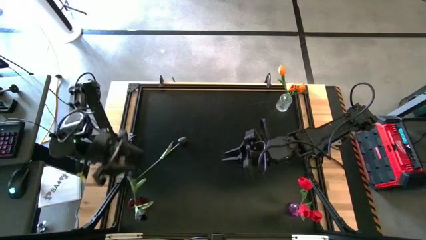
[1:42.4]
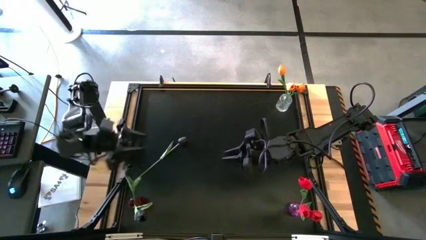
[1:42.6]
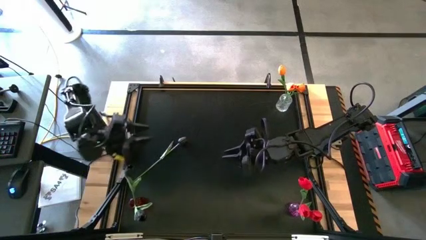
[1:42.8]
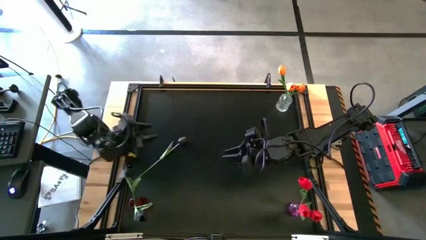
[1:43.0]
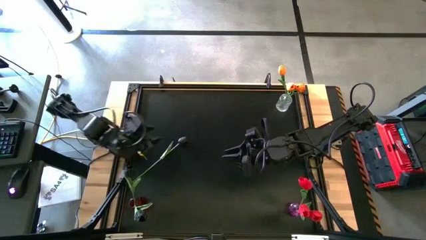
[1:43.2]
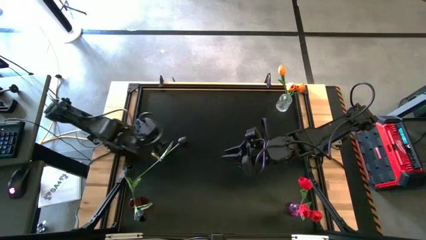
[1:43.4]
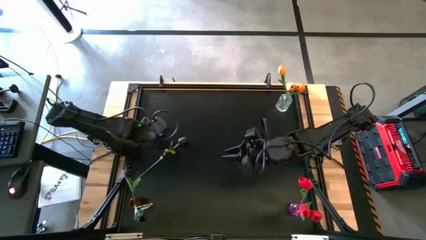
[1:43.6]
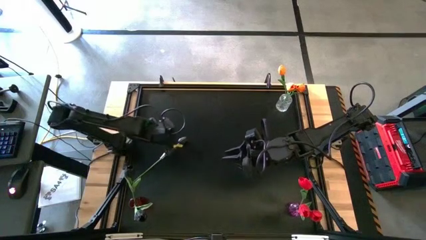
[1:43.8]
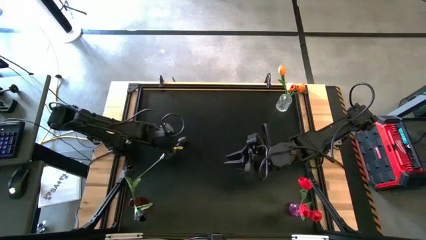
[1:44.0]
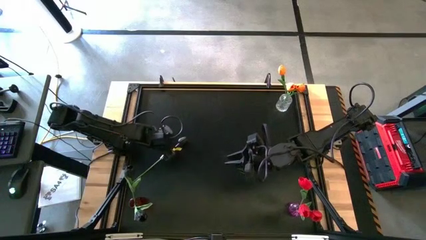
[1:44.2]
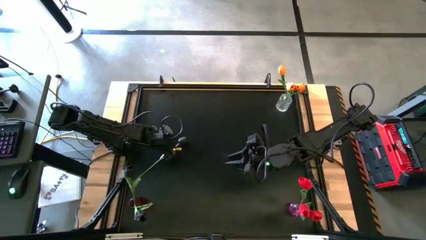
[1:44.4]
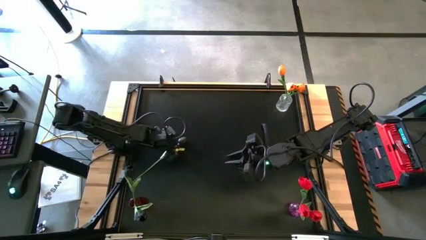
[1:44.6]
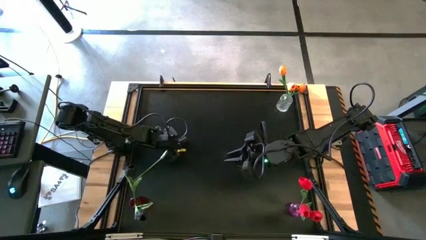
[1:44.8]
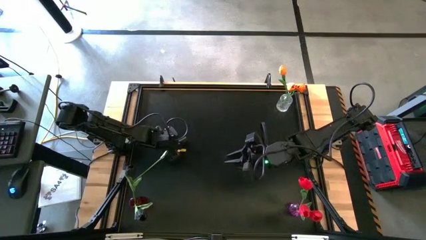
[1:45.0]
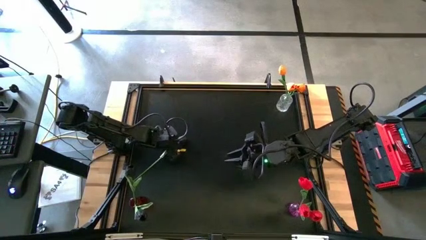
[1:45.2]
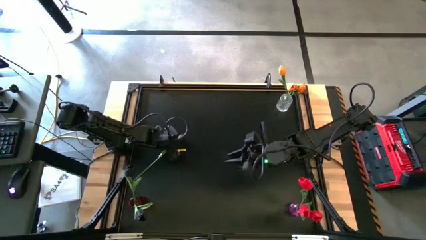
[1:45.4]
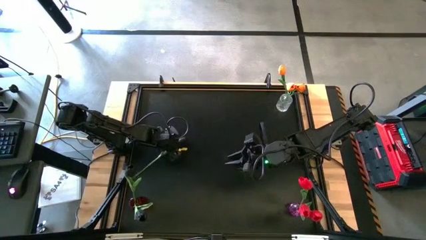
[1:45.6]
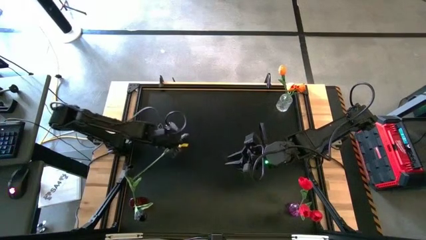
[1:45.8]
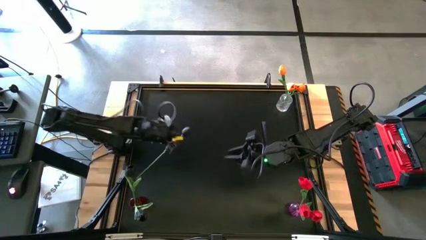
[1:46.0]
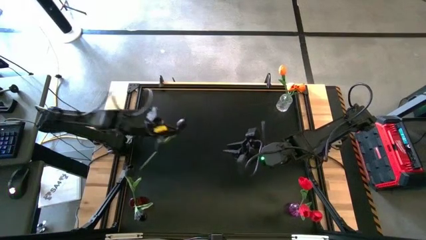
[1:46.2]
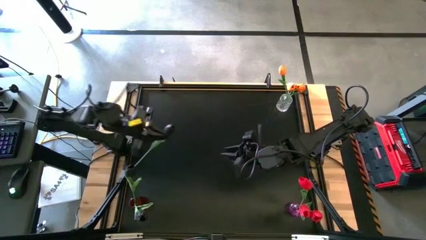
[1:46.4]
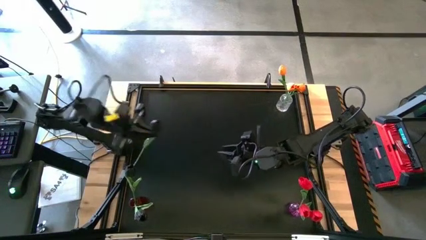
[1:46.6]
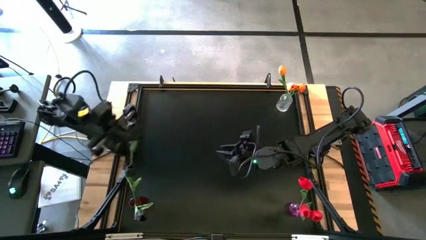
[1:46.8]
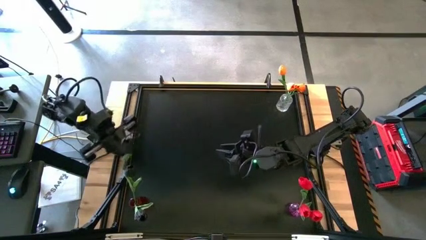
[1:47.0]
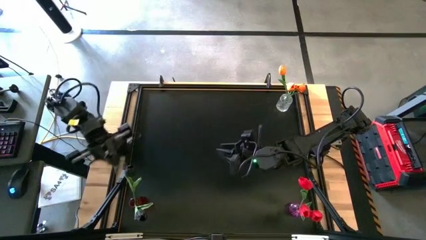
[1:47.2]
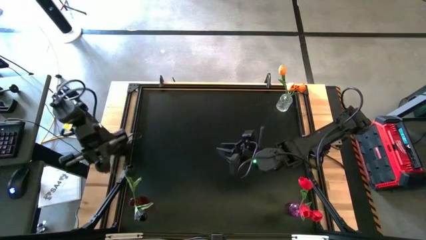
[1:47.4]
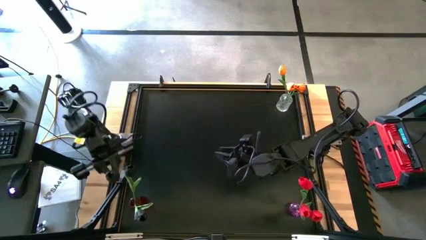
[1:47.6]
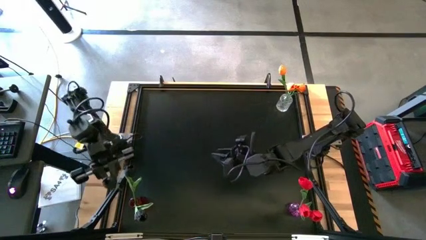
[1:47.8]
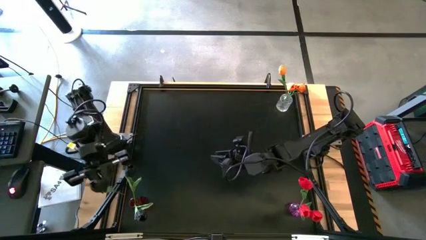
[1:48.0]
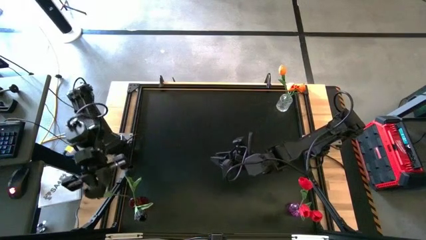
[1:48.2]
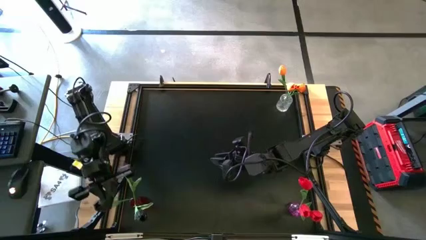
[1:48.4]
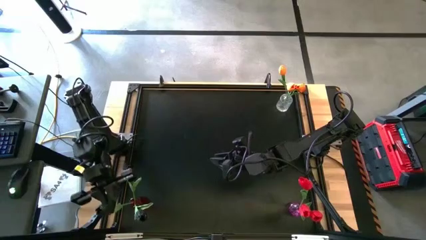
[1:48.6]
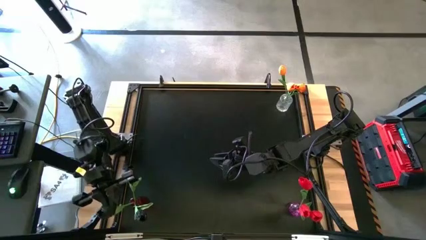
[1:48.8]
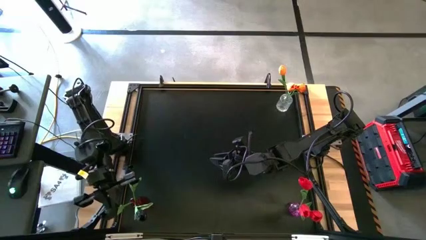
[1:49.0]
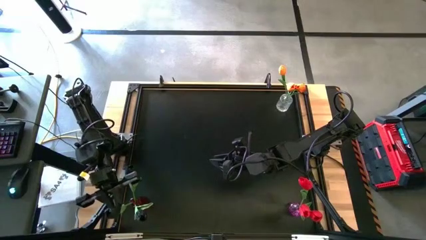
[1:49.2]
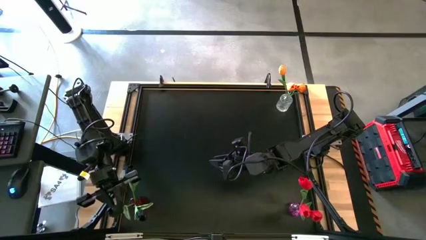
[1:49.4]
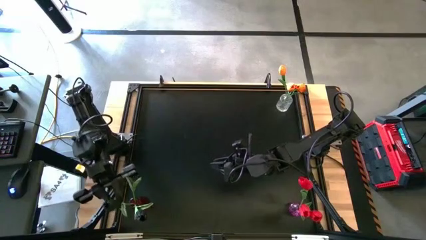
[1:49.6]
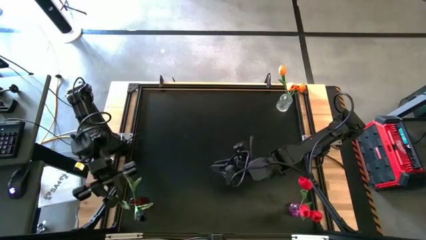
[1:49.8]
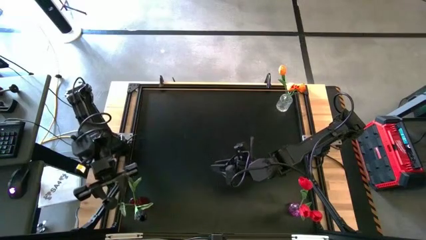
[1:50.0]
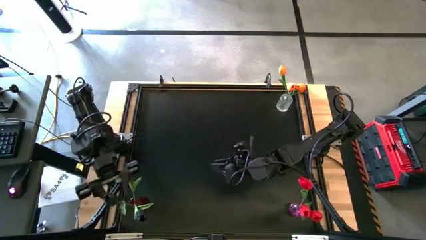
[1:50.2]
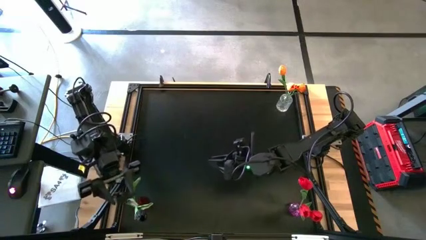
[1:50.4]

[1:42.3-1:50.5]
Task: Sort flowers into vase by color
Put the black tulip into the red flower vase

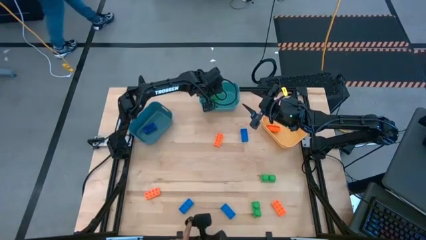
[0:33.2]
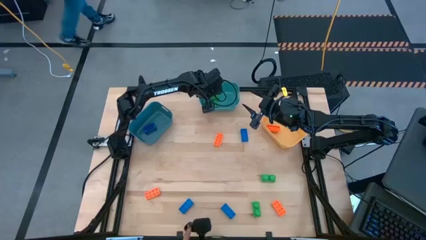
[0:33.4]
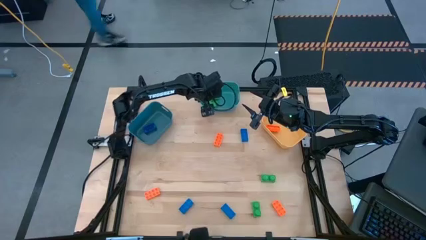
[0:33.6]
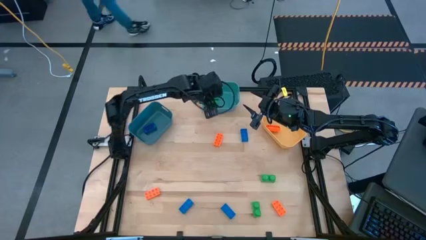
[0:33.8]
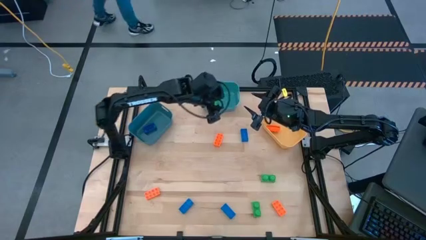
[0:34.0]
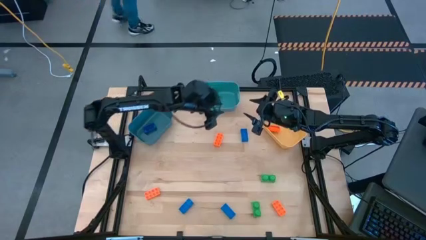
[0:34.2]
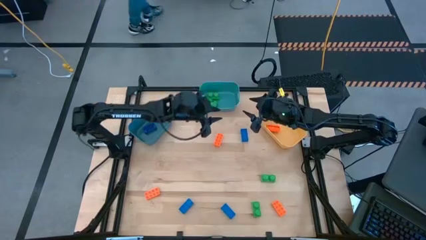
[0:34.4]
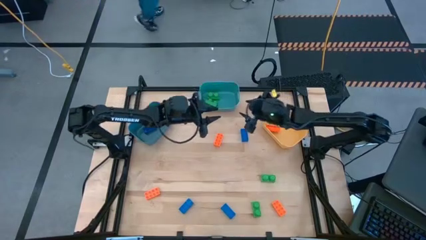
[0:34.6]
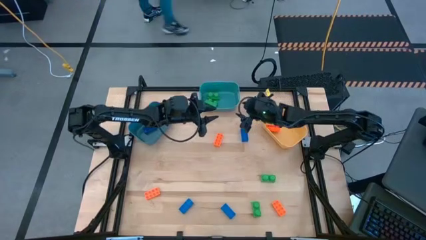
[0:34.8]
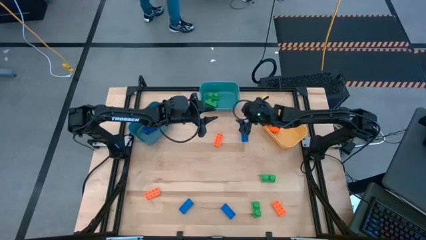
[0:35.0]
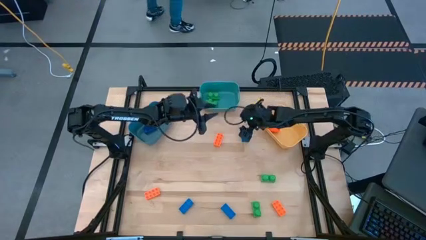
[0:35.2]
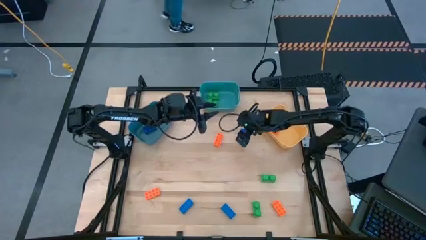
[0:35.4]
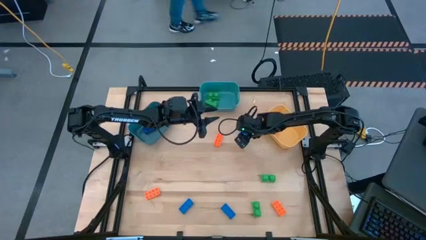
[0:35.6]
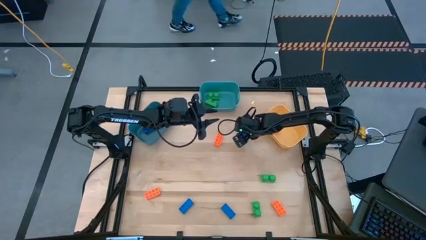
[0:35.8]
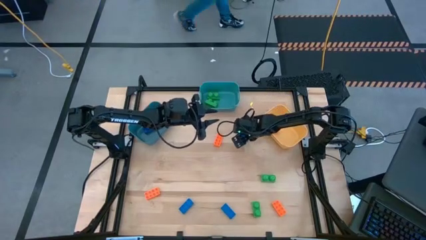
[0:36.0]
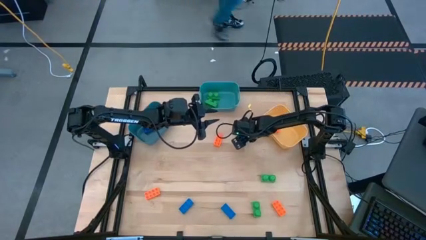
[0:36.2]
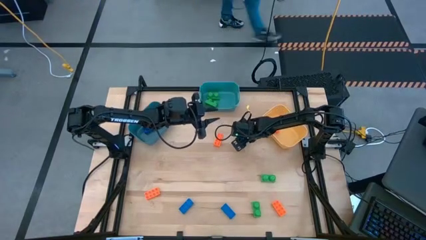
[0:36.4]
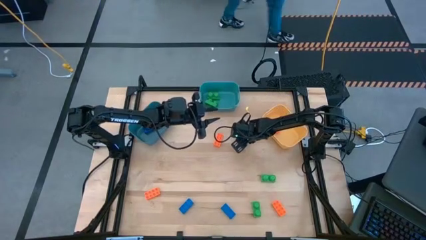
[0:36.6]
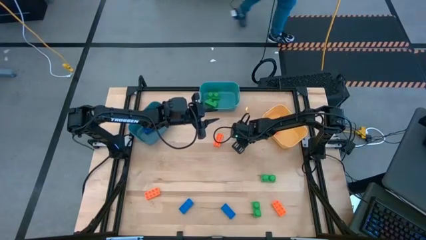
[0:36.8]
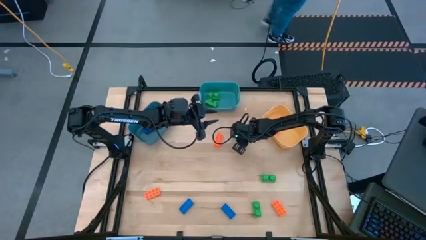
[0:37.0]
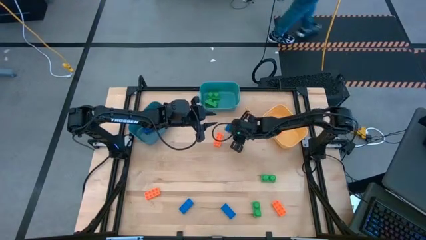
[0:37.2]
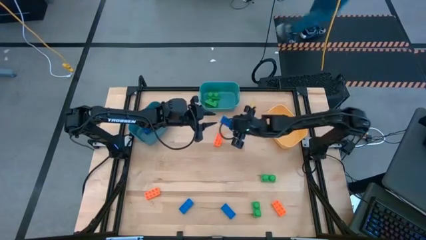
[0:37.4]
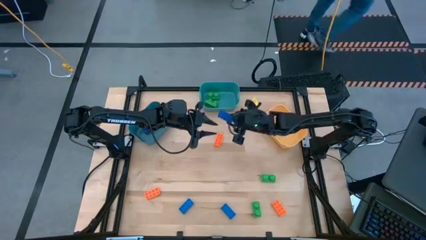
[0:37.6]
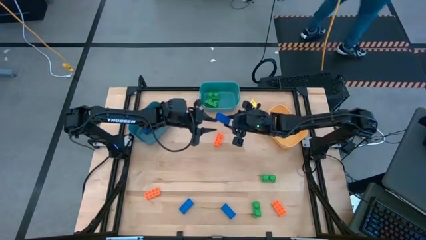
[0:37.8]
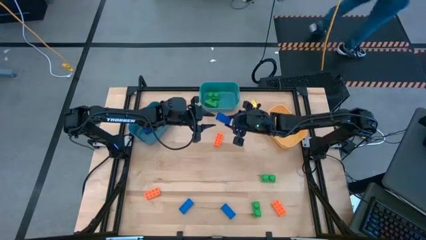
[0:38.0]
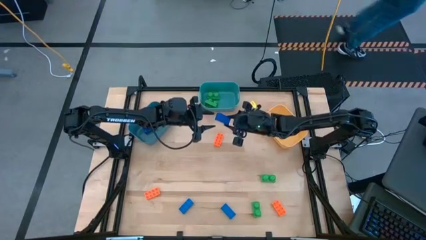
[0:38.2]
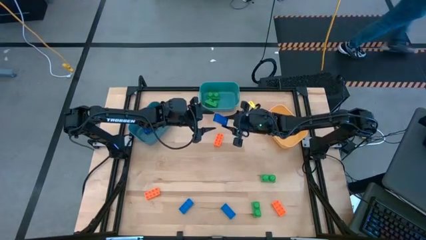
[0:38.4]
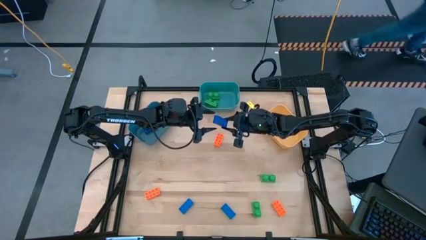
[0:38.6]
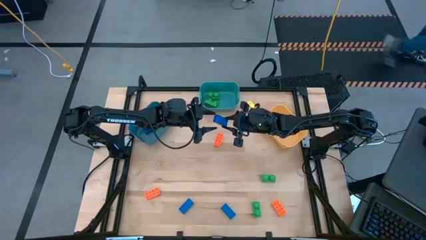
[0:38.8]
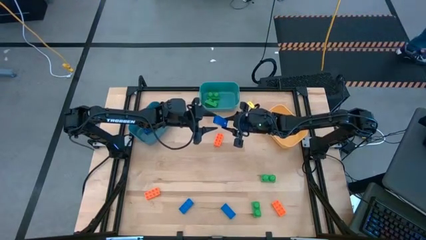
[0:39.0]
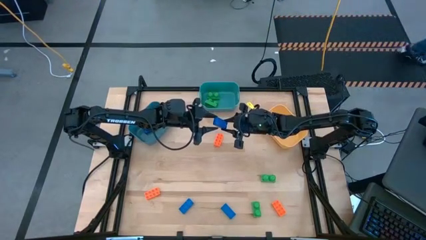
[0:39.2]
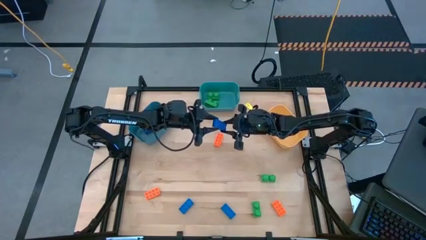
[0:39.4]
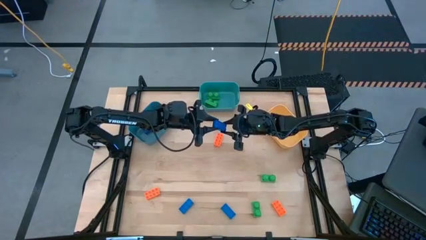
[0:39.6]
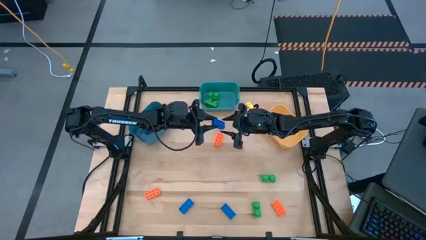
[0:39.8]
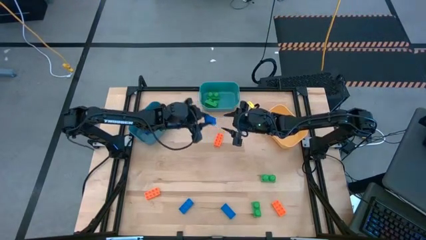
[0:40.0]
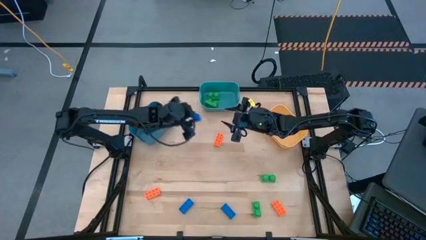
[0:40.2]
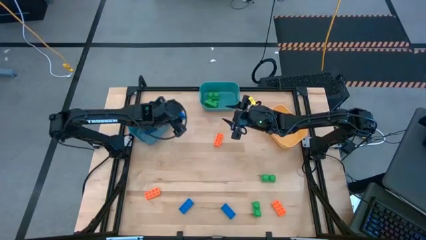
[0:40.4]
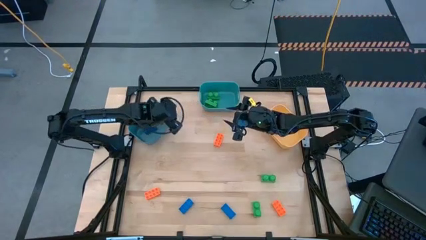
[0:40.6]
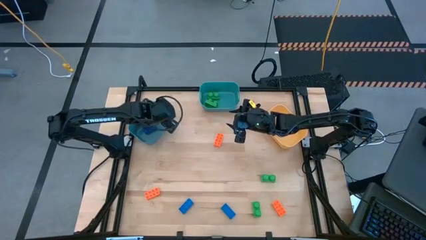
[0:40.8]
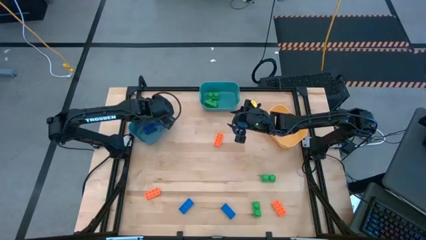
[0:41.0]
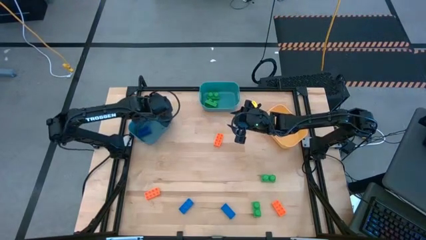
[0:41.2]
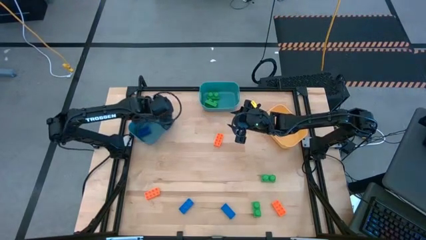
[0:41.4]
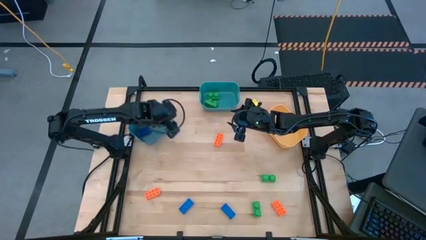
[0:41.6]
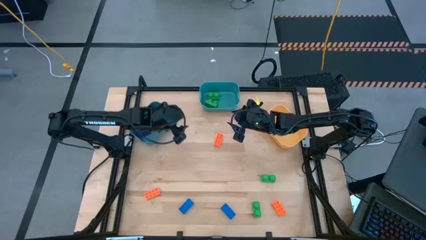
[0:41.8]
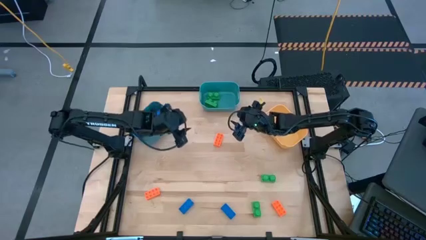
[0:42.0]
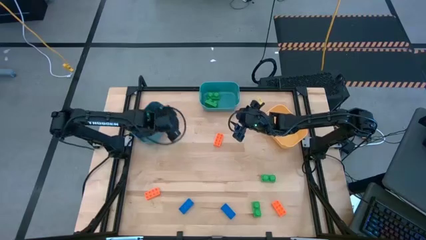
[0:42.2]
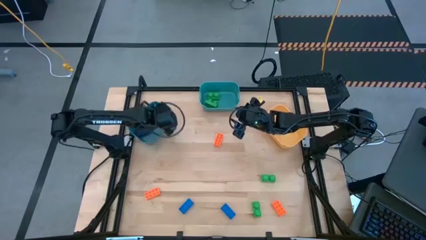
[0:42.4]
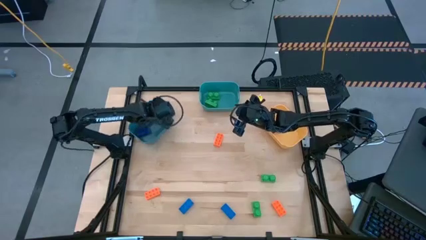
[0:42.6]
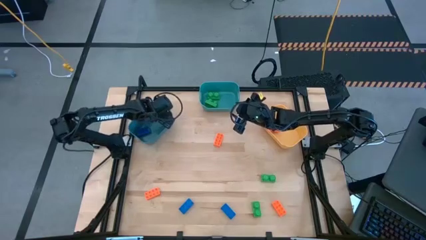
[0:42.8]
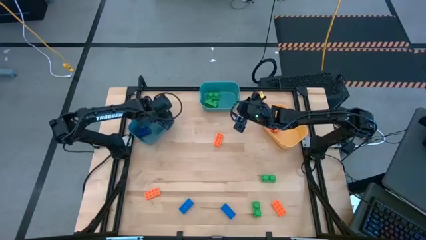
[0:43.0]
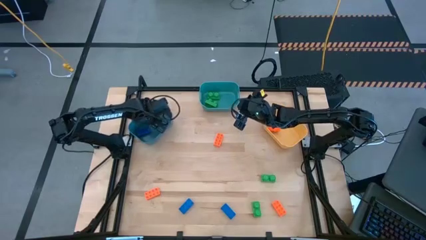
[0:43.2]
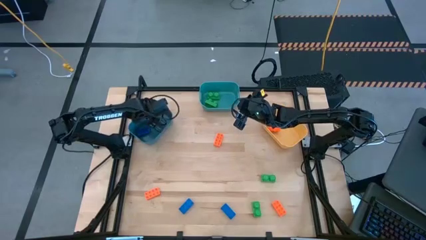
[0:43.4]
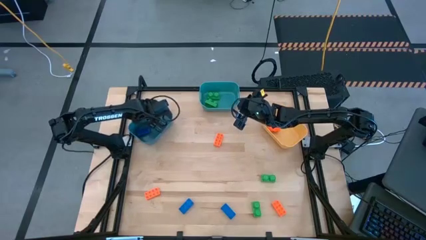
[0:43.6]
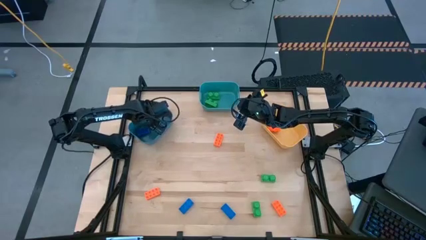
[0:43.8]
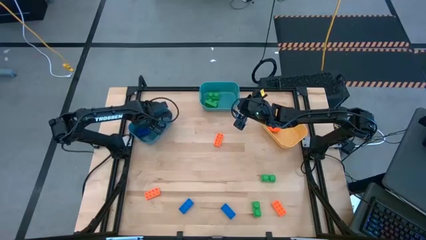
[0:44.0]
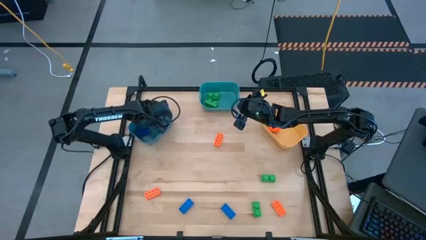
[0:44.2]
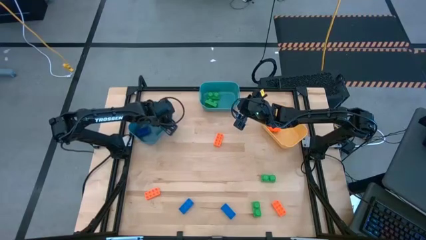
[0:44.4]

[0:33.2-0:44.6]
Task: Sort & place blocks by color
Put the blue game piece into the blue bin
